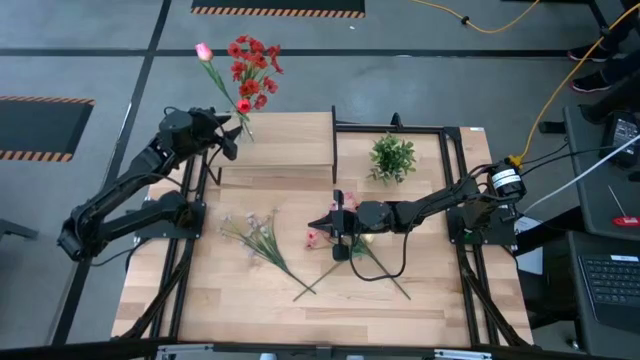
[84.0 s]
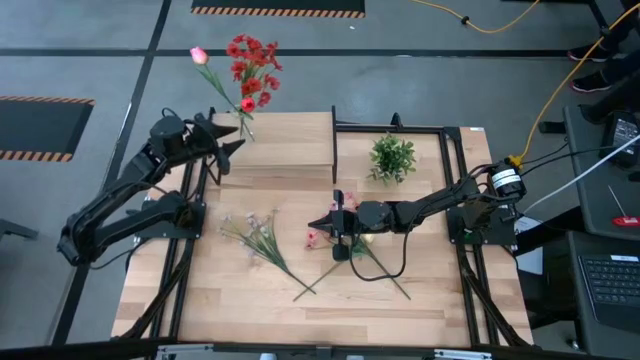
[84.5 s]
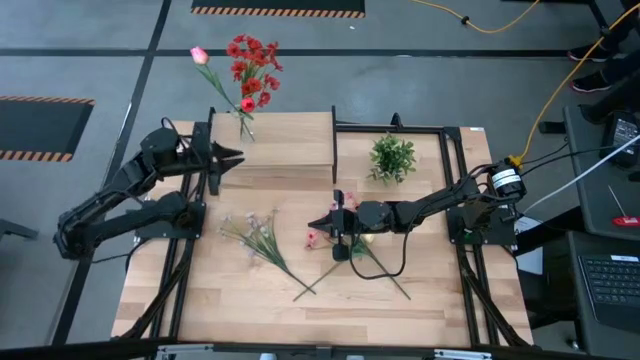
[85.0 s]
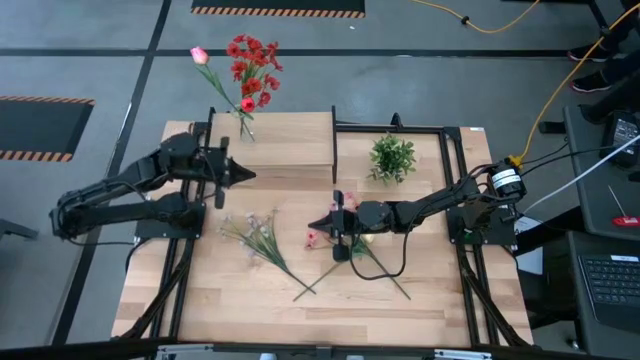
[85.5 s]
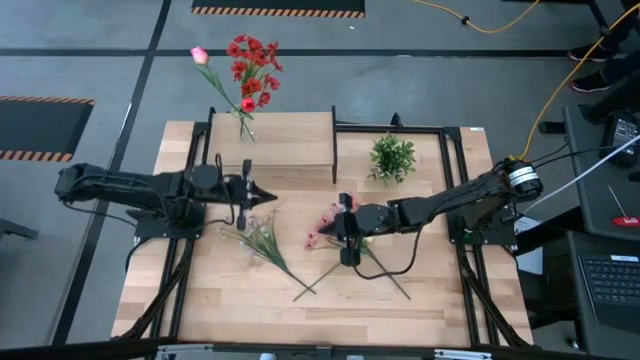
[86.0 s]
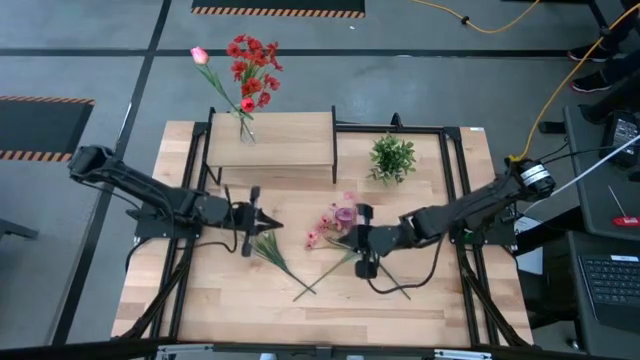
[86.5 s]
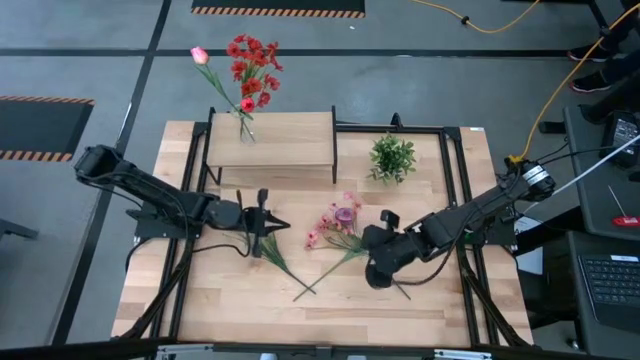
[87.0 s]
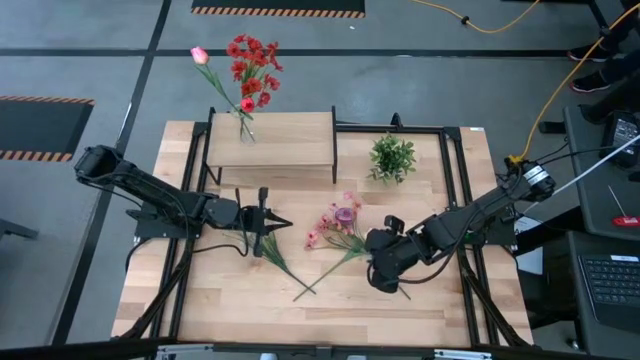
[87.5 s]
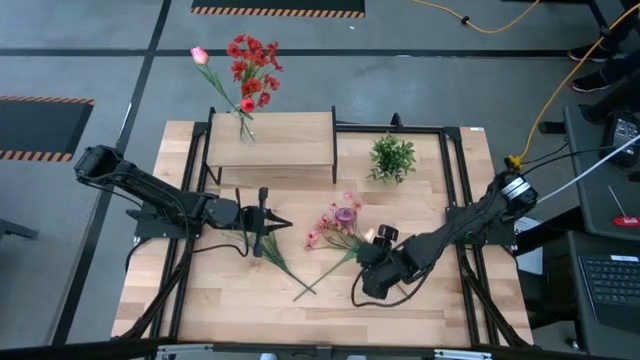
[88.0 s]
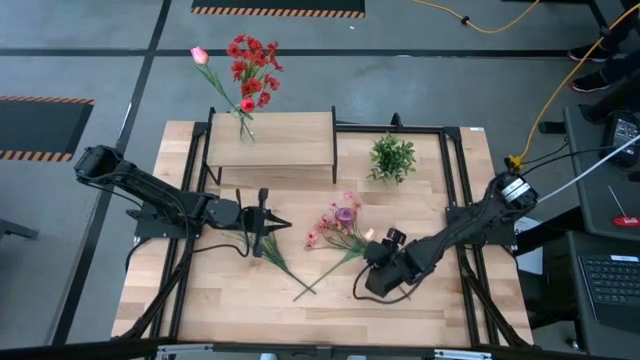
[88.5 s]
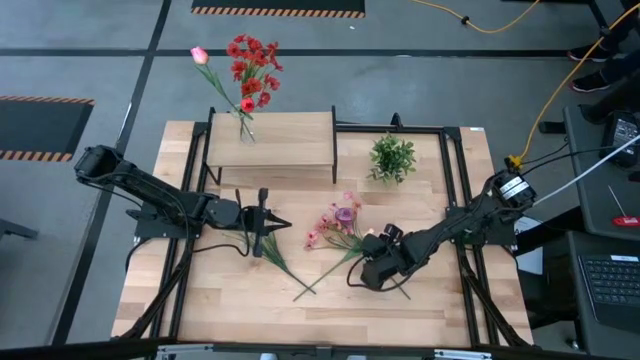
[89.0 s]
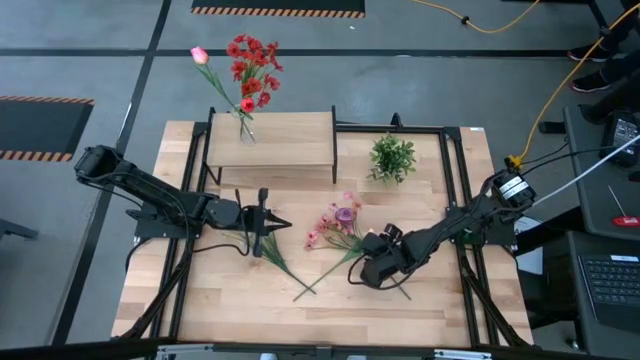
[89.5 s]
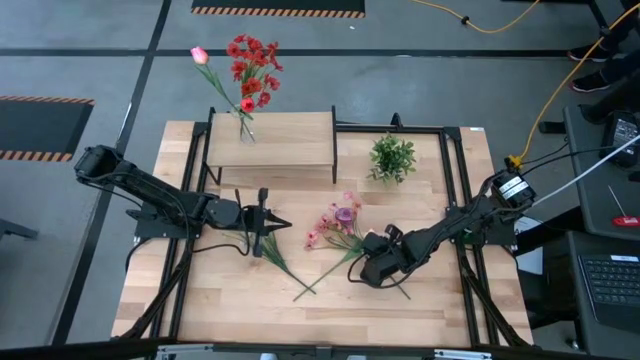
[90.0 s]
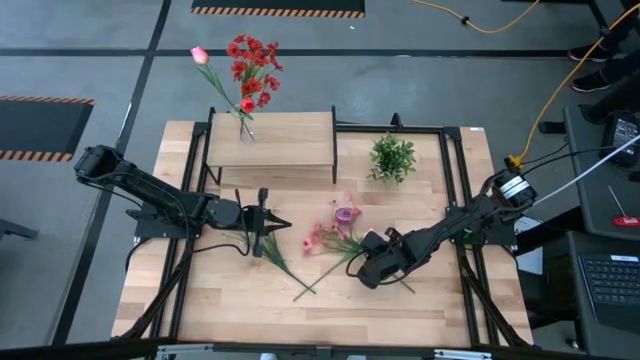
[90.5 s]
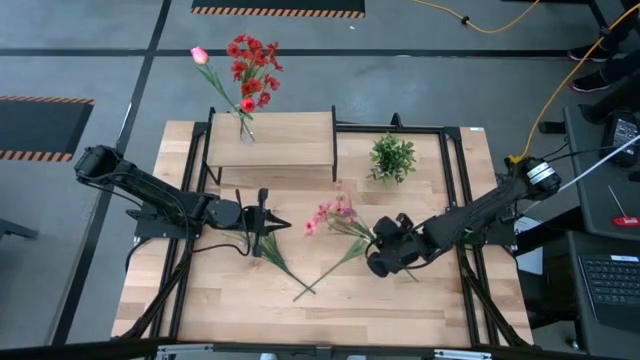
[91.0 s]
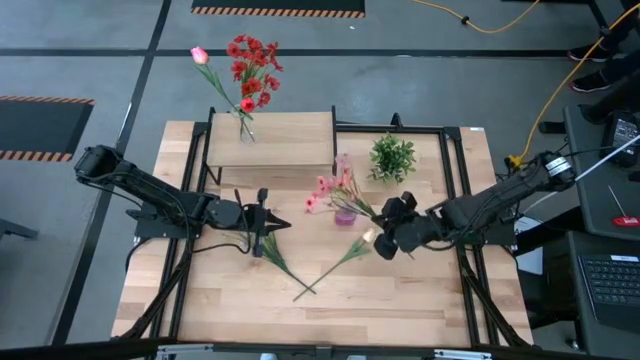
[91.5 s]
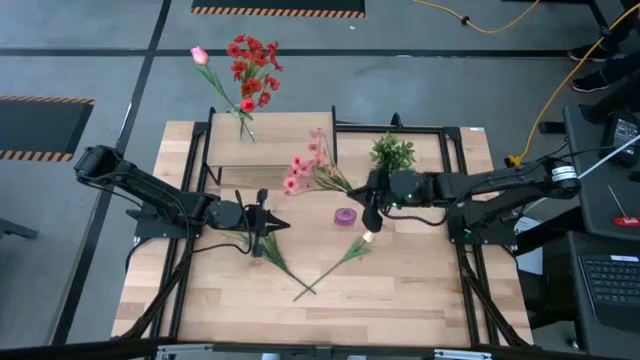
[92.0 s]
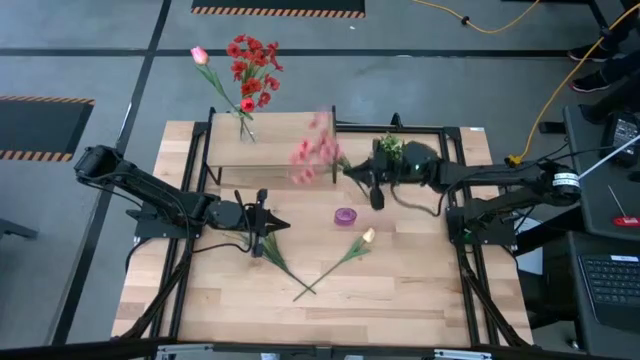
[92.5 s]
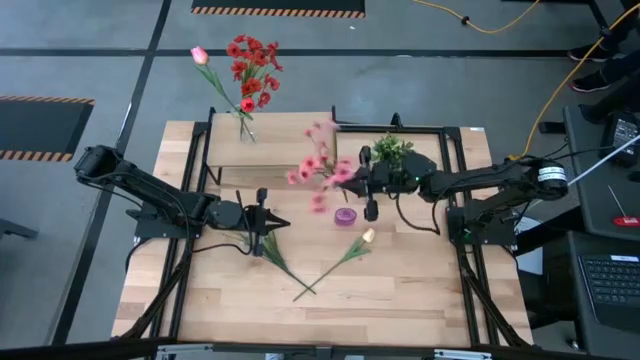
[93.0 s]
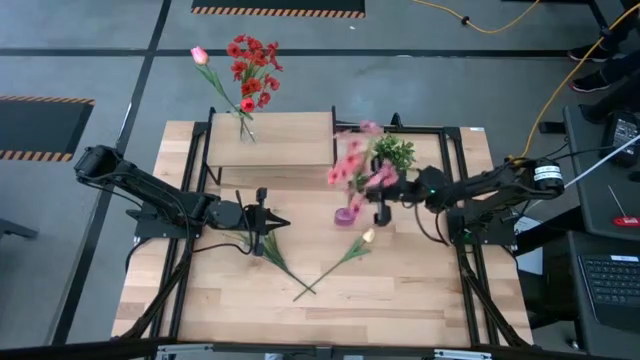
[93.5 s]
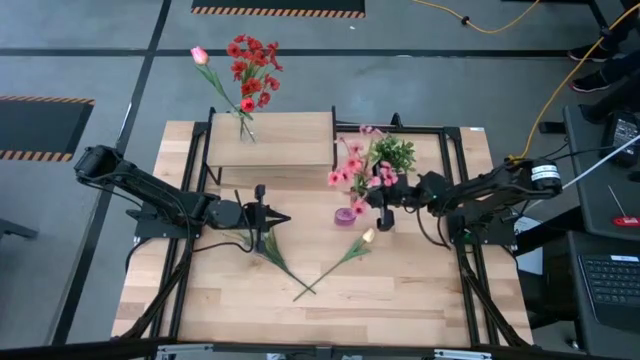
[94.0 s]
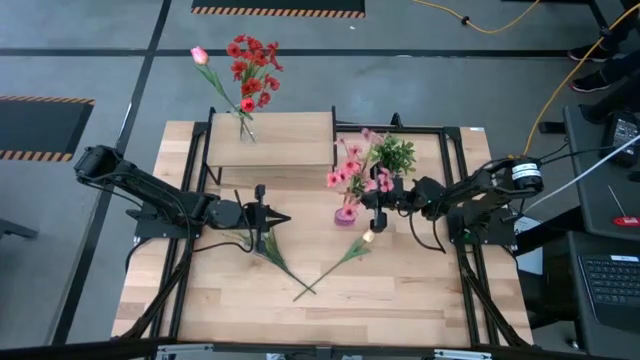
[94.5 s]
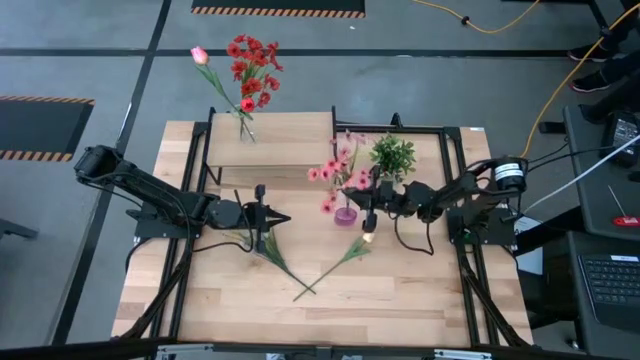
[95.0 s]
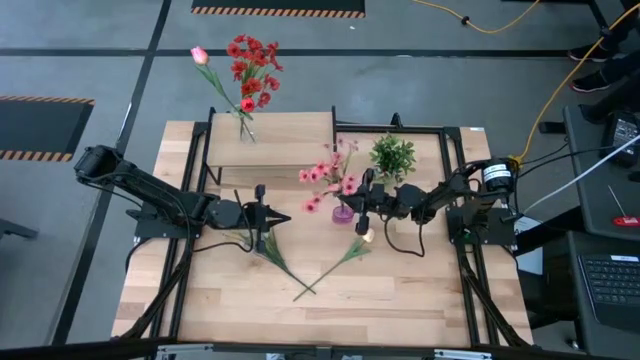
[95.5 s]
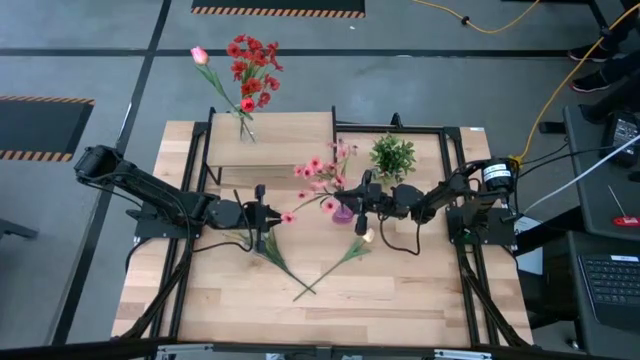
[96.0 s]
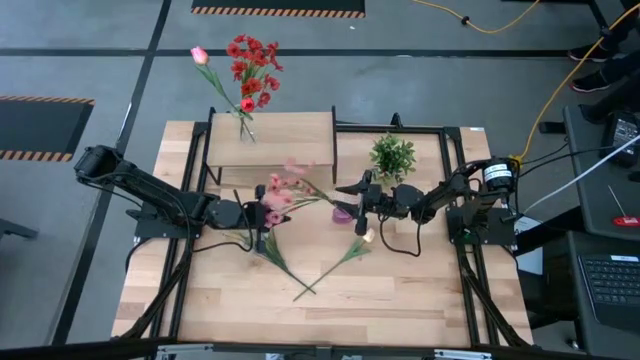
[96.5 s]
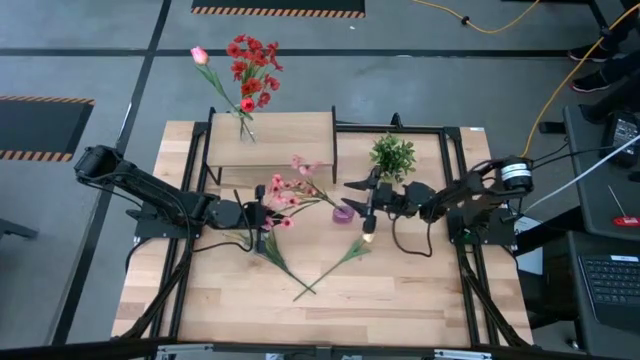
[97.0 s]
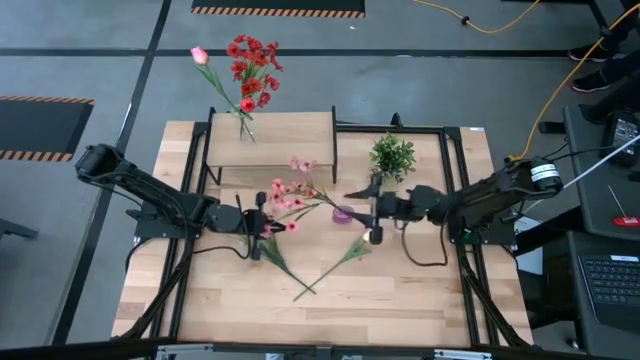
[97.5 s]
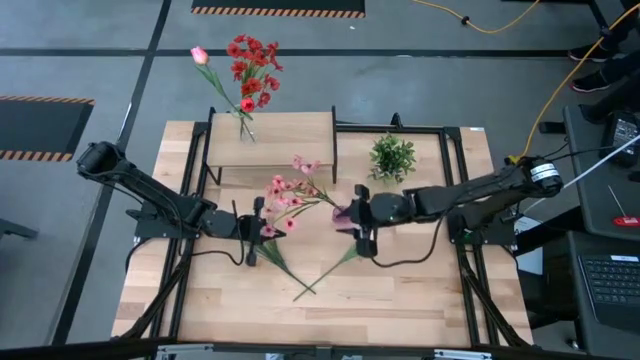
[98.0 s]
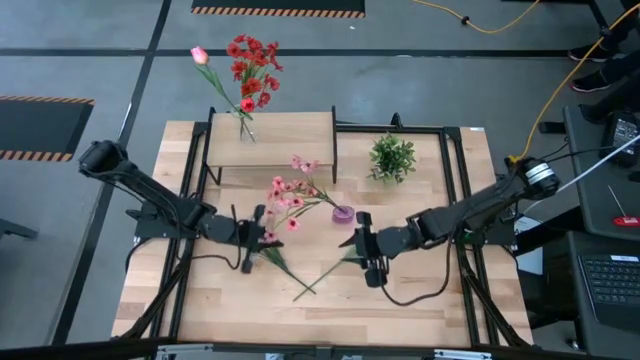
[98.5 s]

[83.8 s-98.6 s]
Task: Pick and place flowers into a vace then onto a shelf
Put the pink flowers into the violet vase

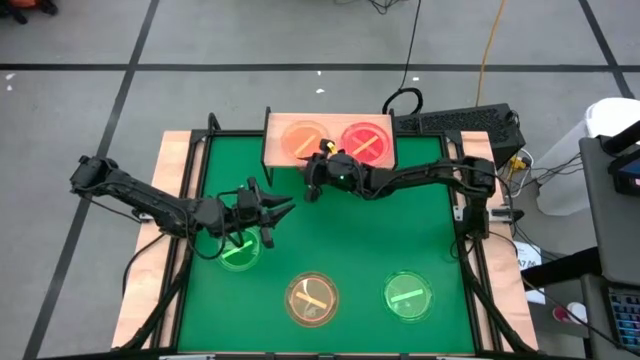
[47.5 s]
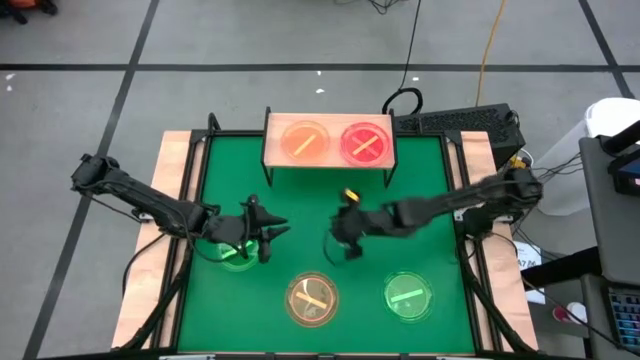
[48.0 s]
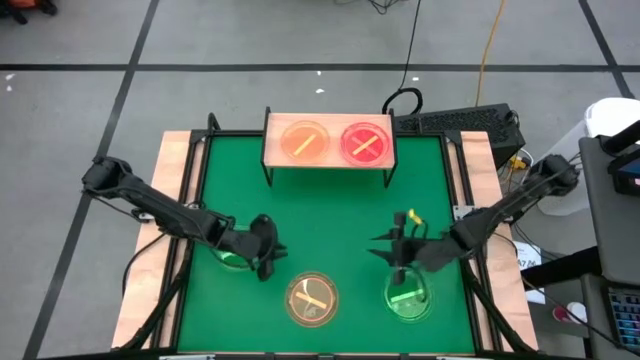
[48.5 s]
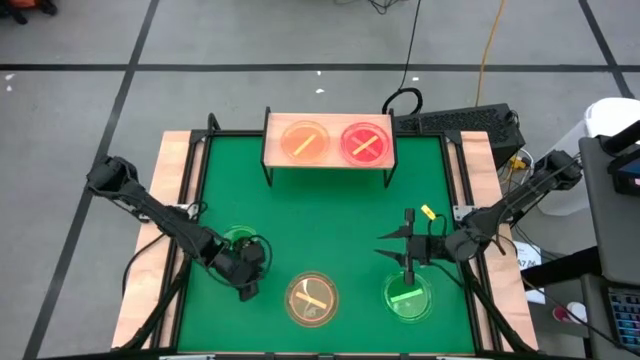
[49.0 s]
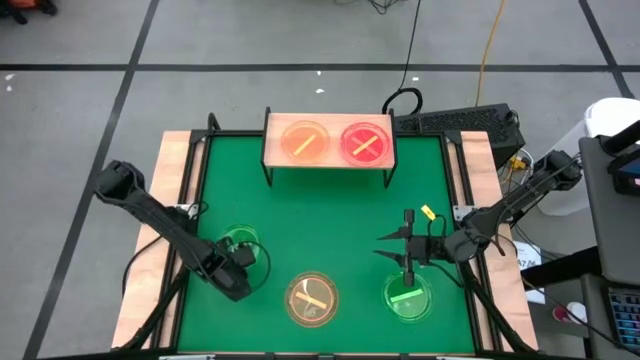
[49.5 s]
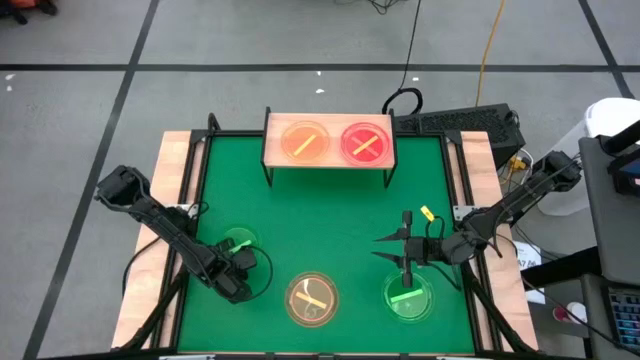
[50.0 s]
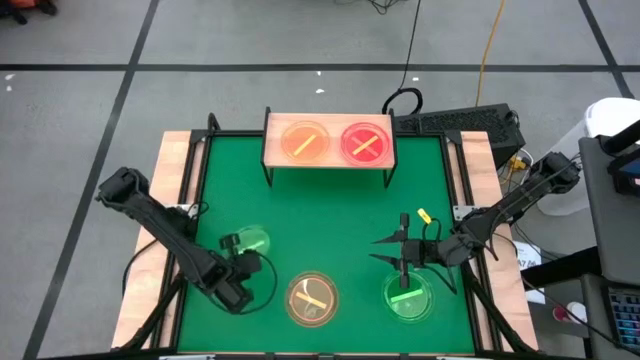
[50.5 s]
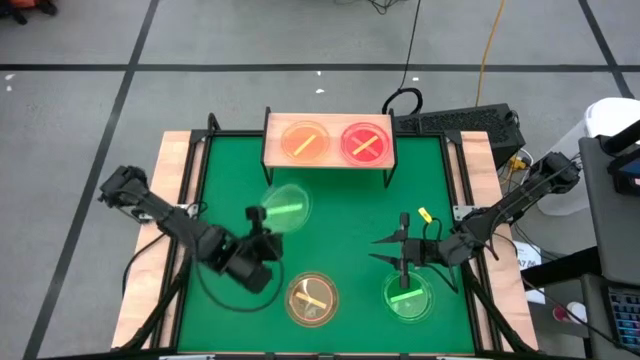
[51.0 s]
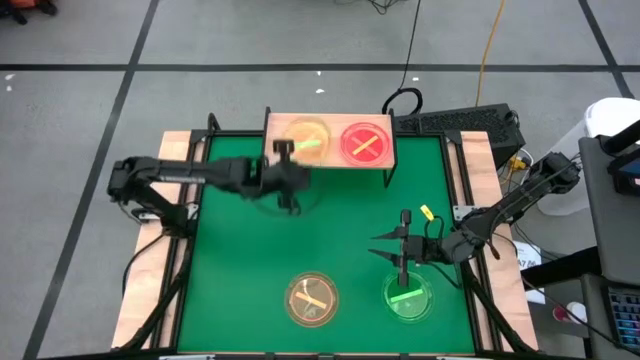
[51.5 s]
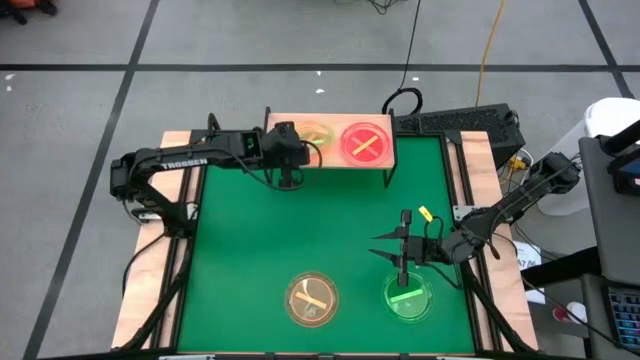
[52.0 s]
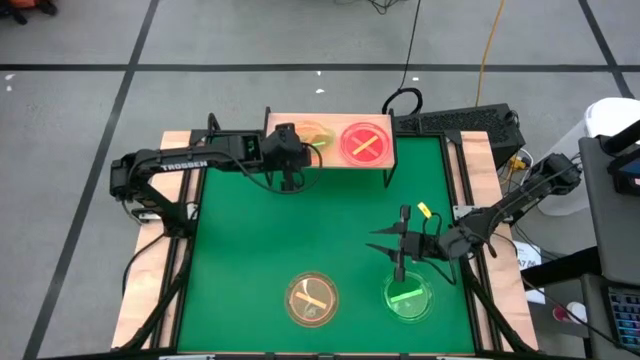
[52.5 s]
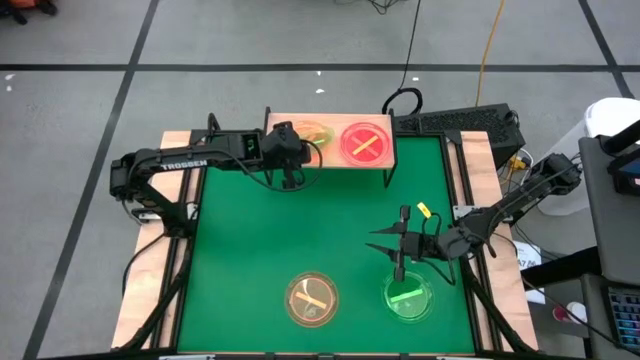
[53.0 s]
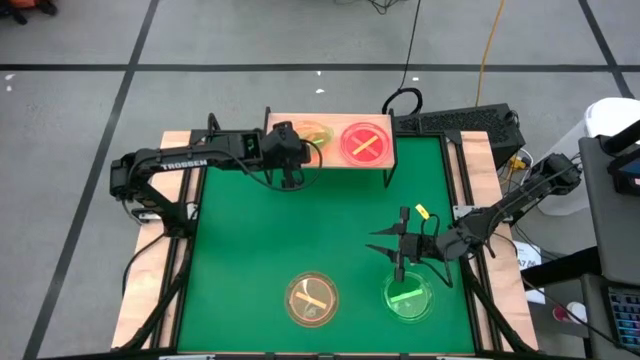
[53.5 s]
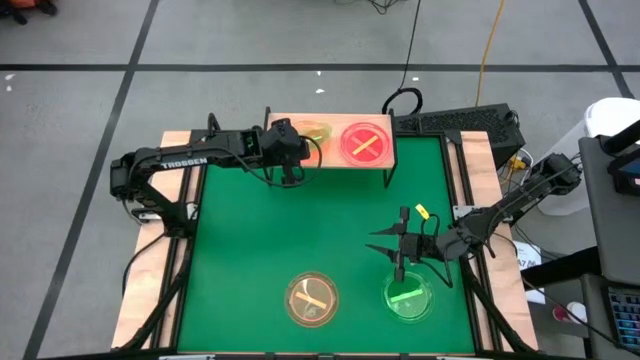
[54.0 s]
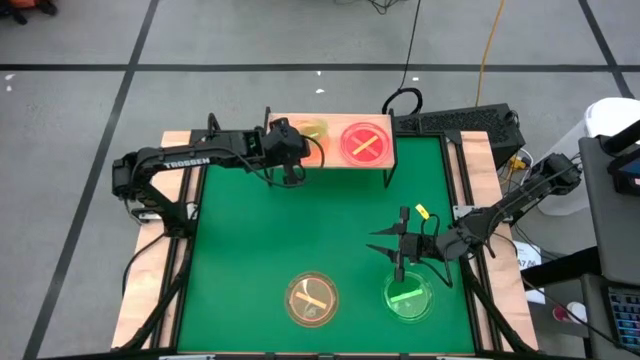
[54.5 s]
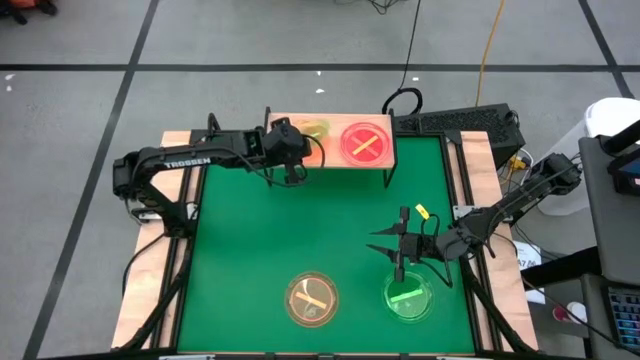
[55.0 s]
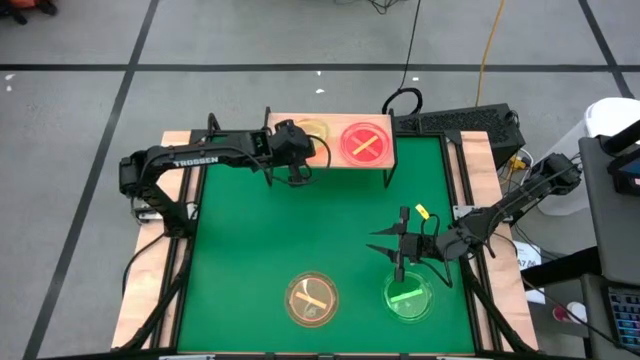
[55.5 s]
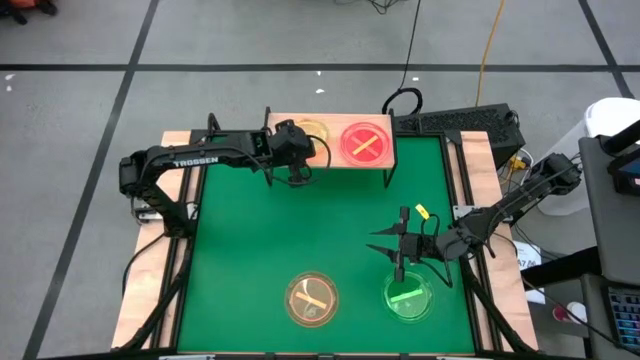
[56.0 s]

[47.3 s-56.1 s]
Task: Place and stack plates onto a shelf
Stack the top green plate on top of the orange plate on the shelf
